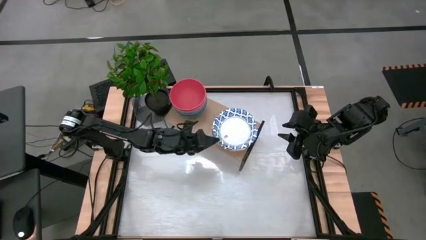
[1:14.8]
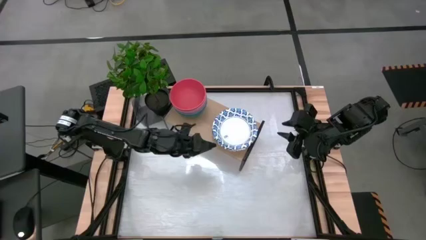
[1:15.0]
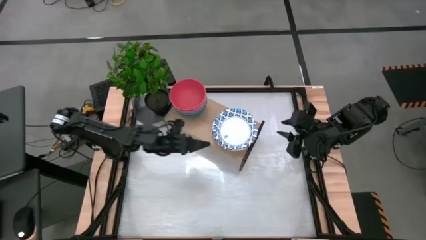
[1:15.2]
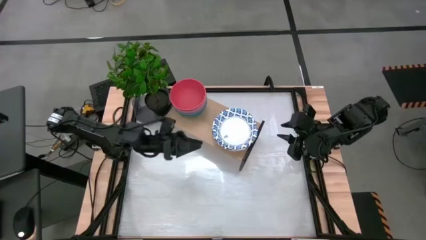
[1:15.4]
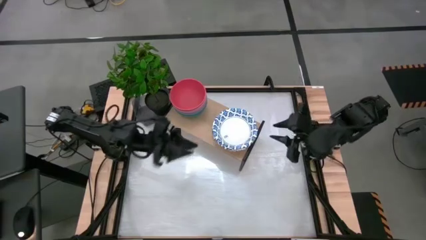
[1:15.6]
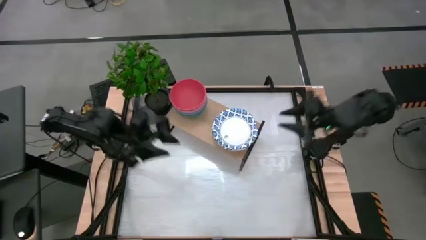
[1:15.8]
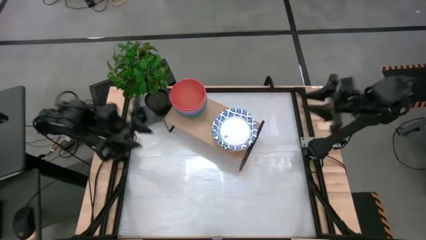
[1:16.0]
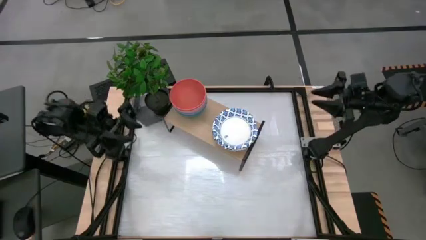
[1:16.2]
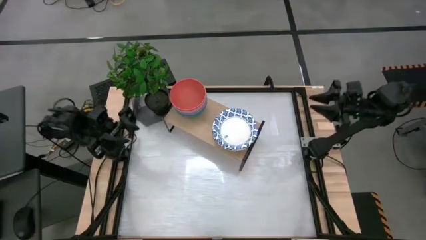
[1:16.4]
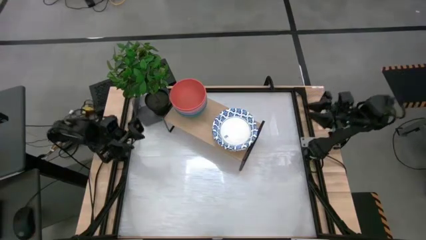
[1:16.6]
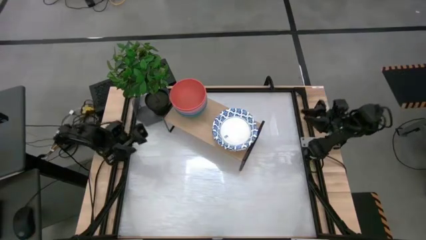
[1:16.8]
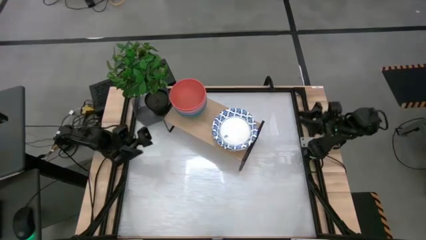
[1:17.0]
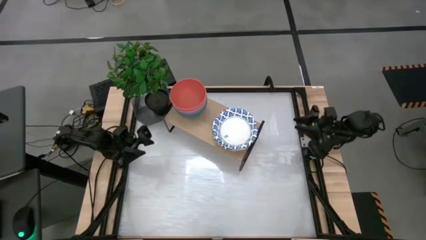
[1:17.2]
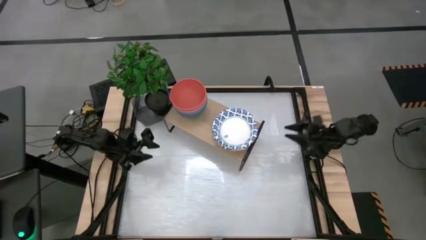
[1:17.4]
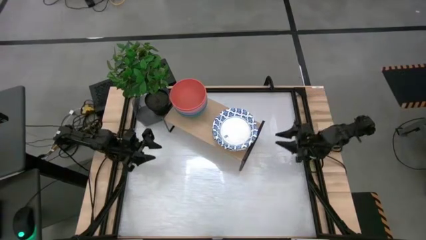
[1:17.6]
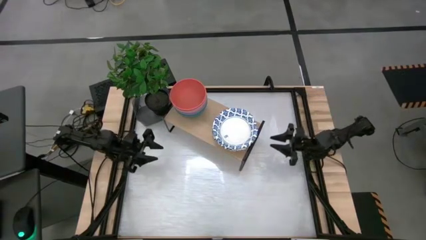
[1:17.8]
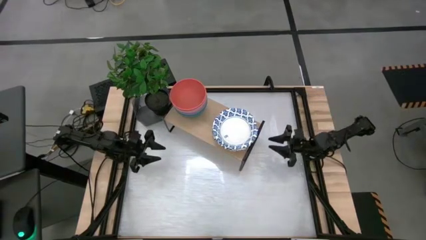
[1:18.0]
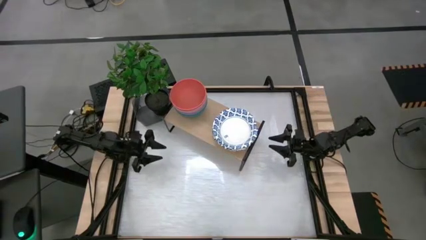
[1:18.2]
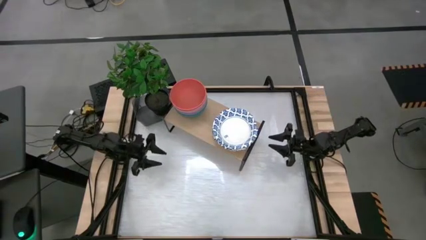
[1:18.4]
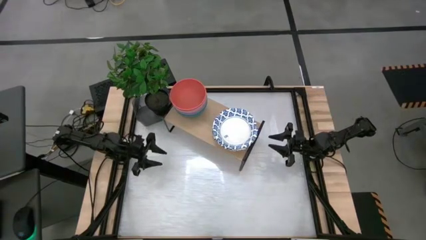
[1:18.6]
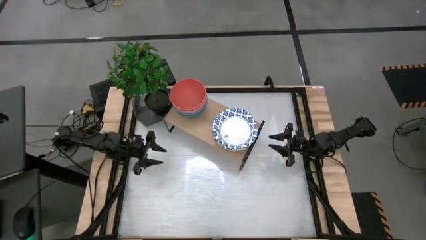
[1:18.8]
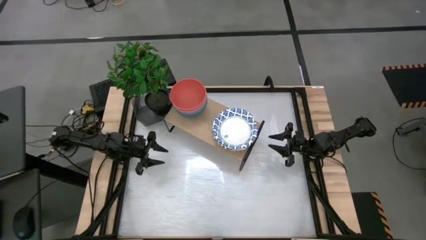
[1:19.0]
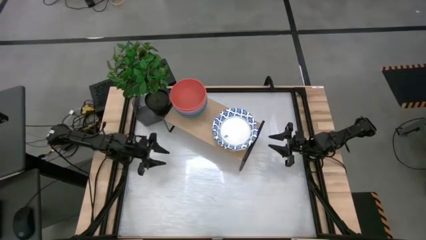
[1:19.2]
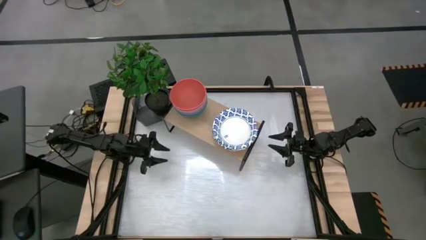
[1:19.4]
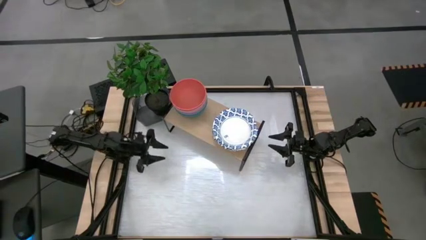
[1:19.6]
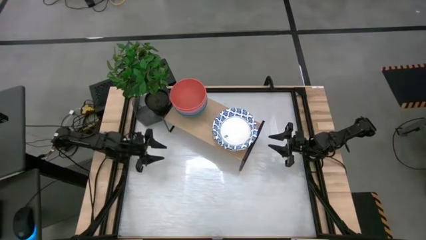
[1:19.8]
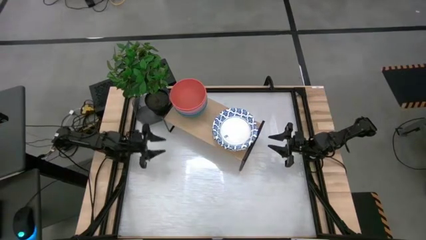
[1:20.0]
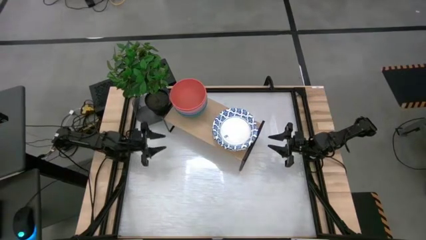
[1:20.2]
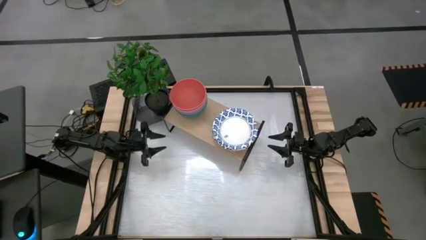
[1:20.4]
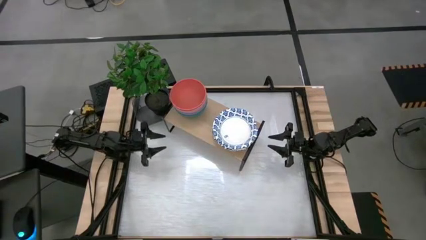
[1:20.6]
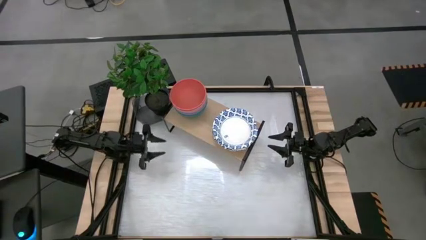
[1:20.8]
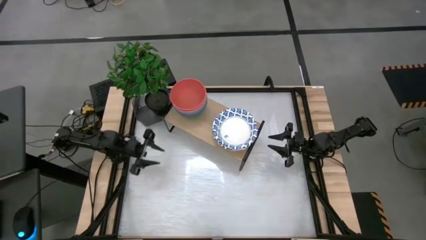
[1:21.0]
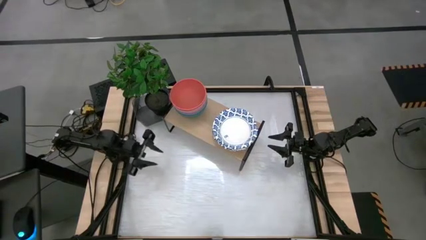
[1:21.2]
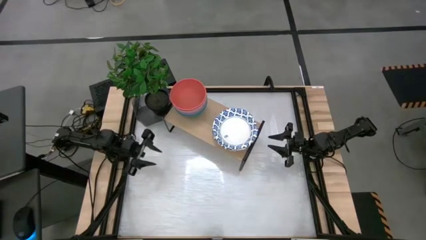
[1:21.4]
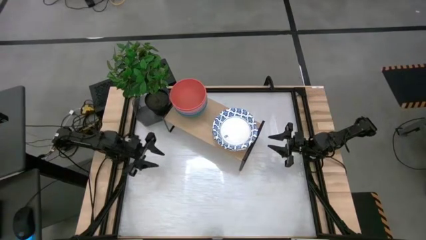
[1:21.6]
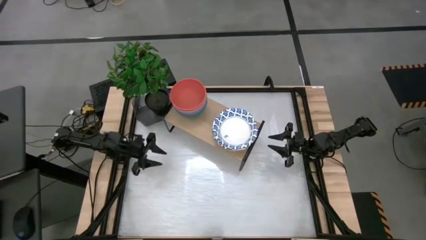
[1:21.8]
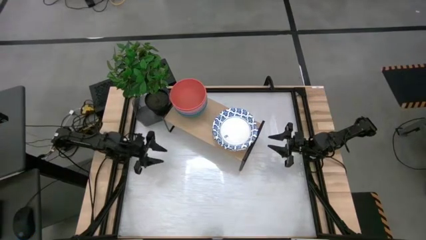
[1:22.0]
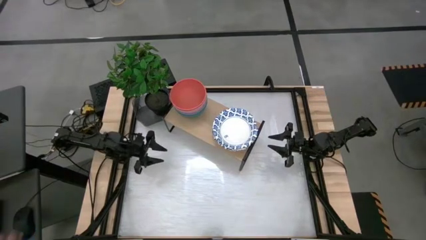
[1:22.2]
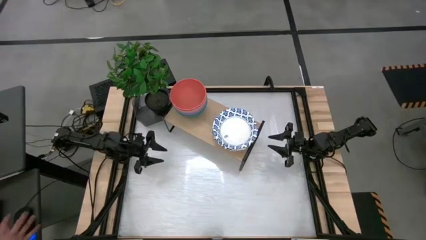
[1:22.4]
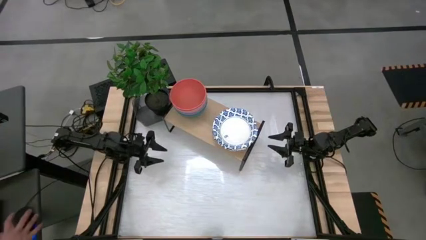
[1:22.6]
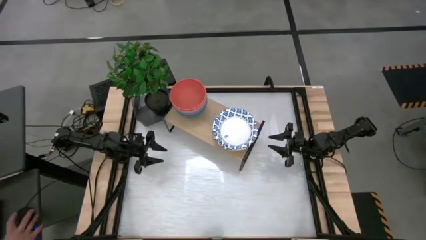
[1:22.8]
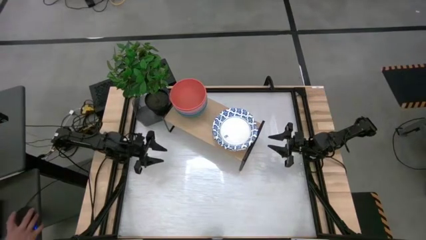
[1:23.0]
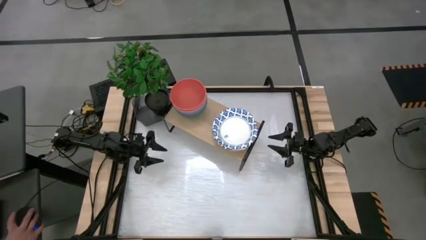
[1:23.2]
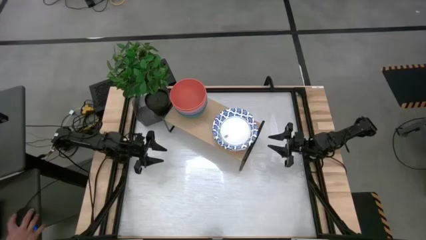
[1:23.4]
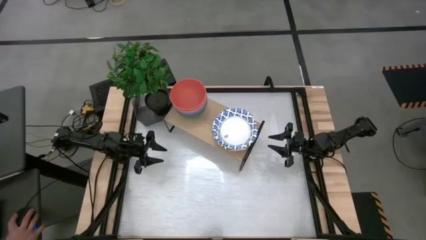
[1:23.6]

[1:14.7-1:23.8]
Task: Place and stack bowls onto a shelf
Return to Home Position

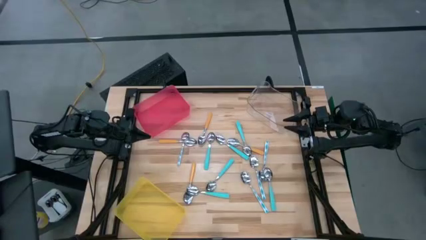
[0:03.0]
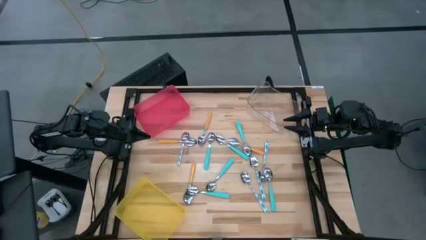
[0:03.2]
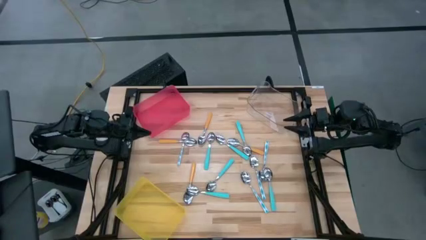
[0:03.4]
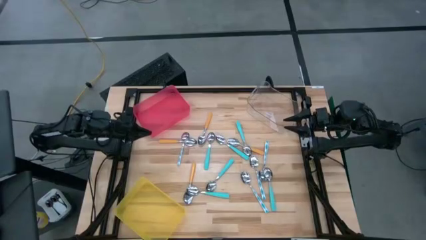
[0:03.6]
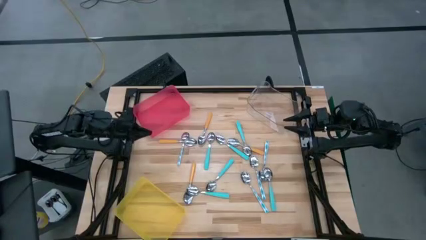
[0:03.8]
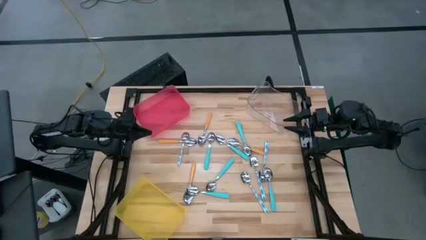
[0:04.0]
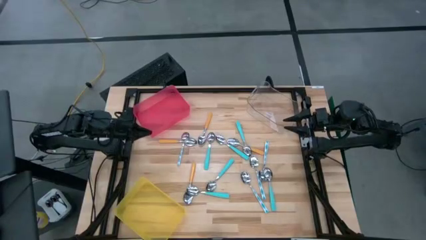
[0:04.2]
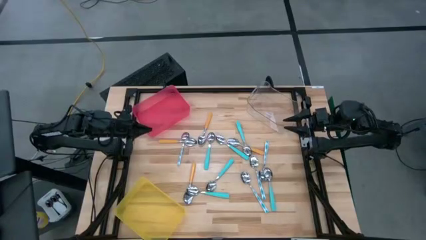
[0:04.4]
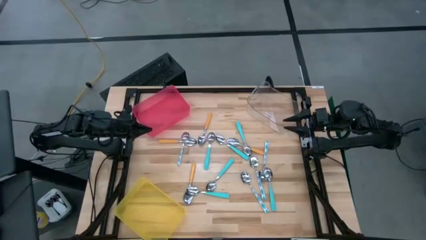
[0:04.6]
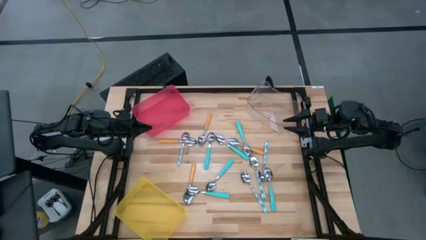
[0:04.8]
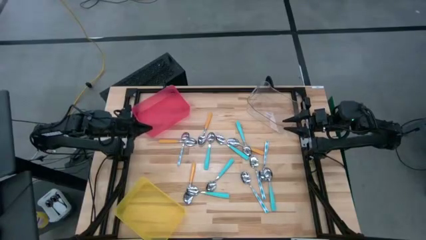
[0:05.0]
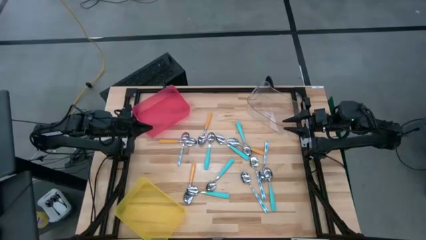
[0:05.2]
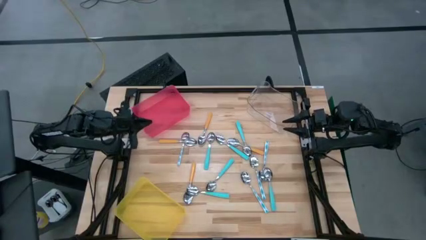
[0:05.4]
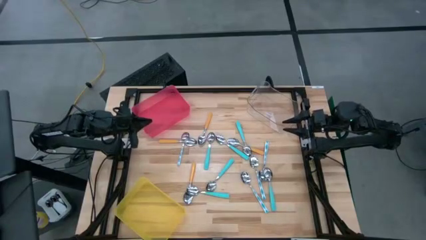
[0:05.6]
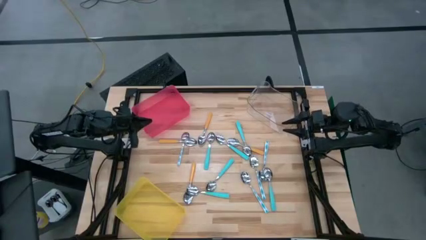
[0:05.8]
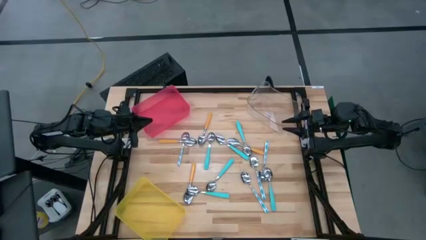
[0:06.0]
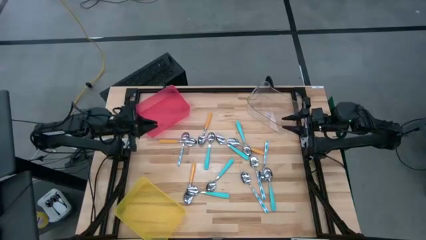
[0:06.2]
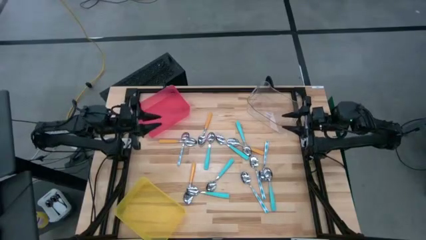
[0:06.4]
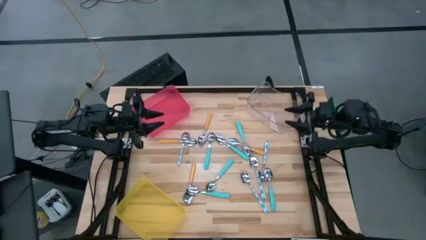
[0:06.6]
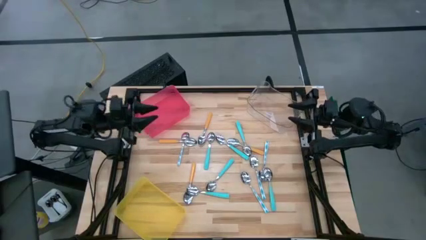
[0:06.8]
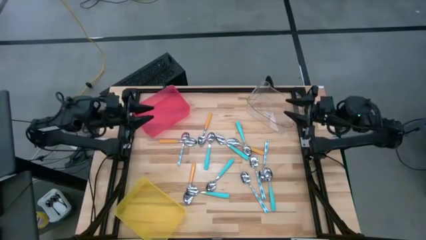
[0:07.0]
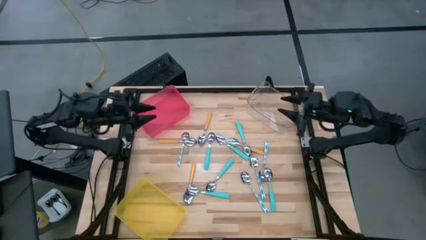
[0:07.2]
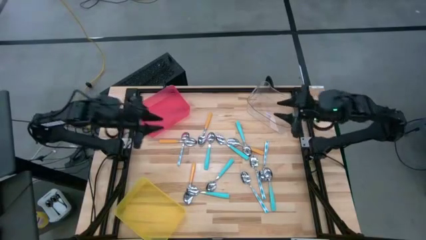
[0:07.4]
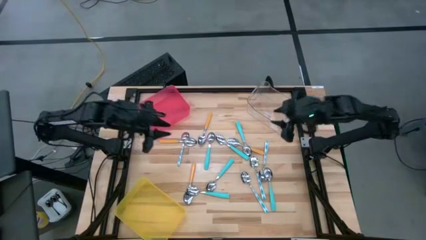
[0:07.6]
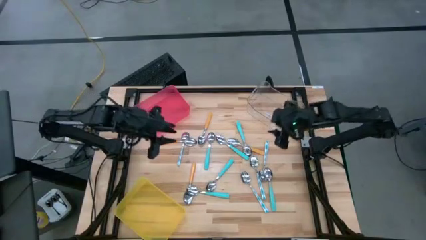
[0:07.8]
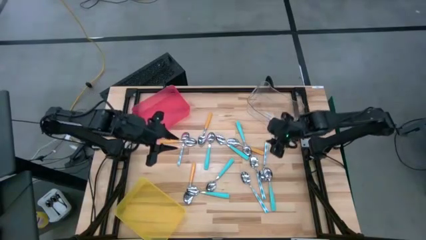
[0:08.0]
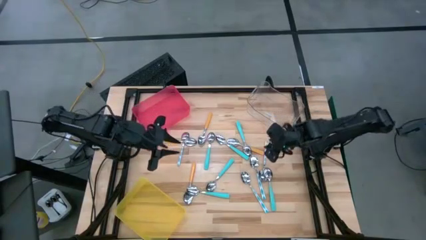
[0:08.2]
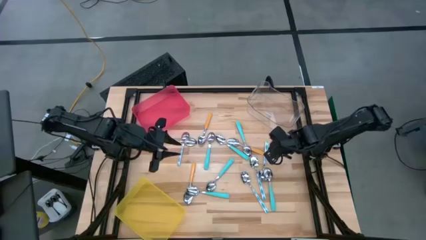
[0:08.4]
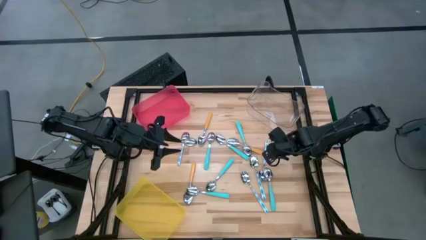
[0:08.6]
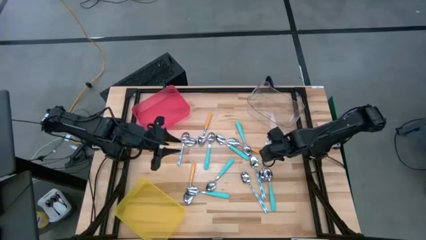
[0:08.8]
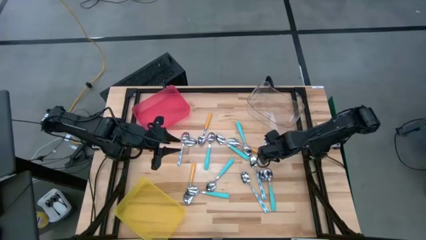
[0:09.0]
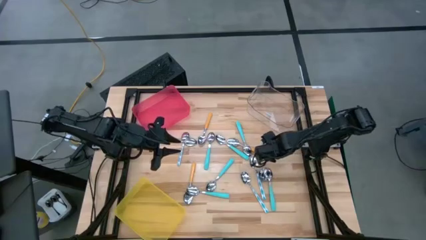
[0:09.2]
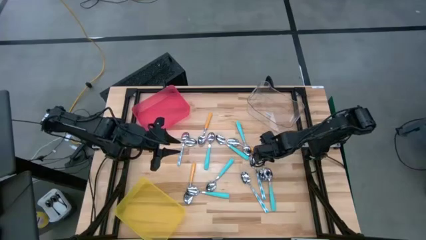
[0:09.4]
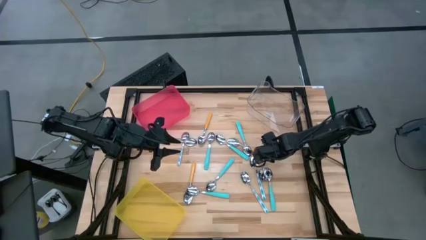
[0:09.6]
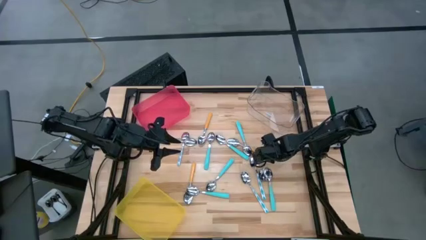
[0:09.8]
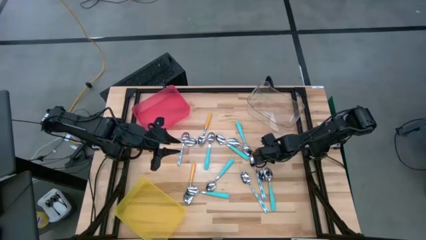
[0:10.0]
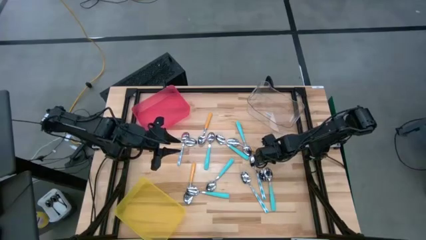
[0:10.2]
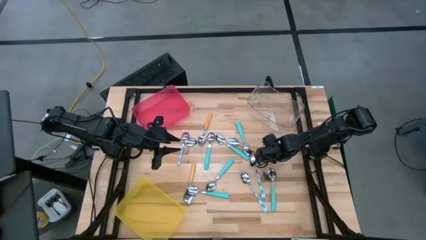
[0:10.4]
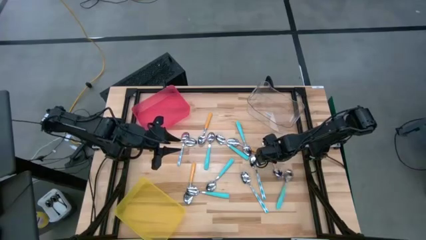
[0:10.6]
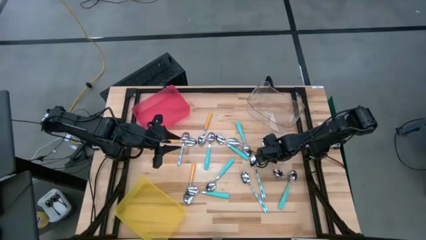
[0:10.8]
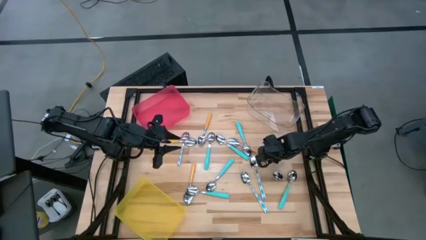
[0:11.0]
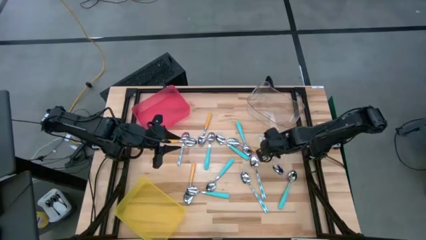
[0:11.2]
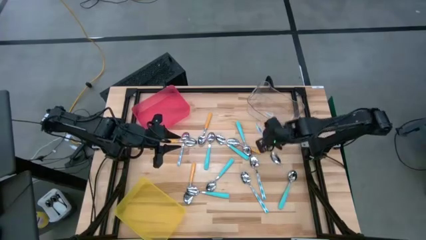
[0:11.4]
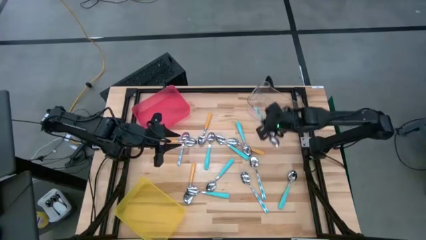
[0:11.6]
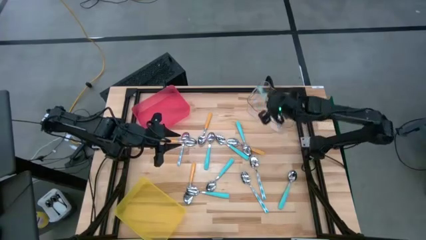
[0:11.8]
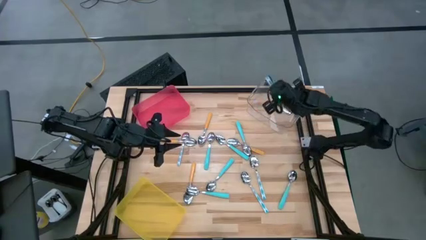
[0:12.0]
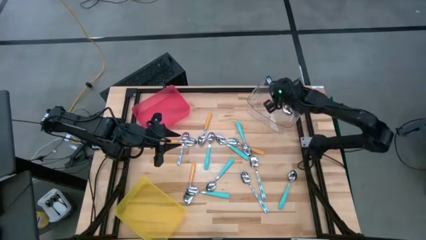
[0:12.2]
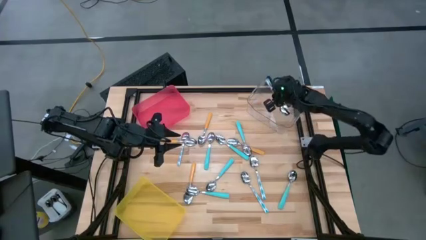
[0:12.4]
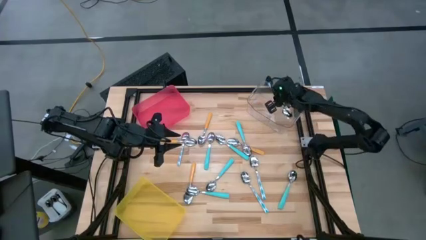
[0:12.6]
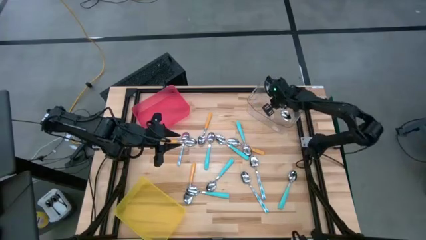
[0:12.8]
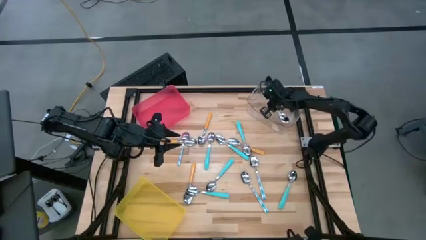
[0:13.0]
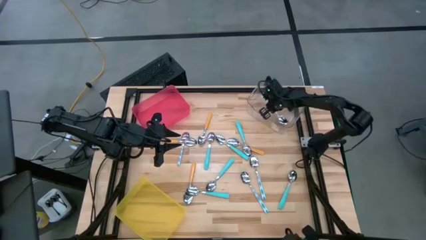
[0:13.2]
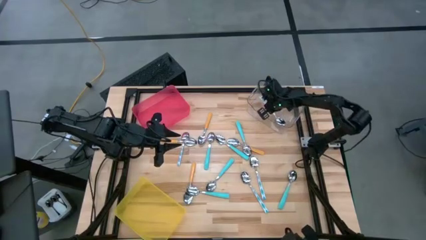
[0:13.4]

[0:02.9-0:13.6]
Task: Sort silverware by color (type)
Put the patterned blue spoon into the transparent bin
